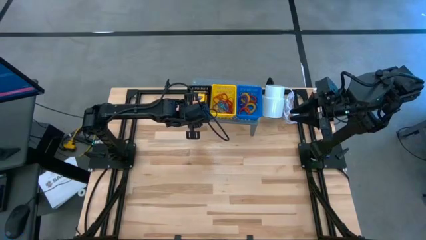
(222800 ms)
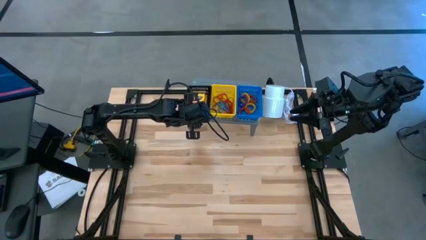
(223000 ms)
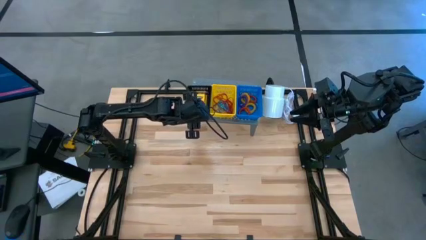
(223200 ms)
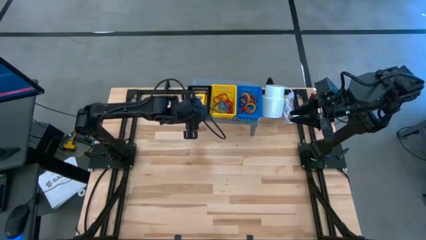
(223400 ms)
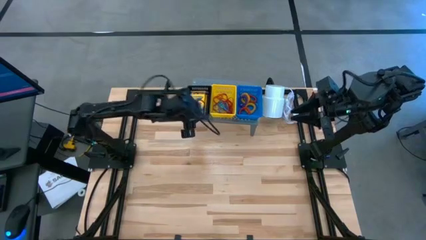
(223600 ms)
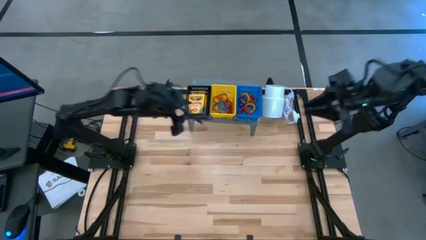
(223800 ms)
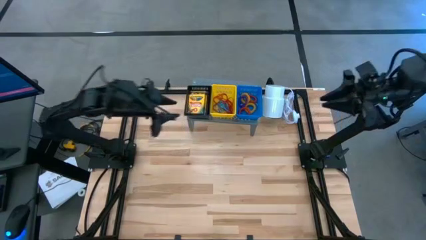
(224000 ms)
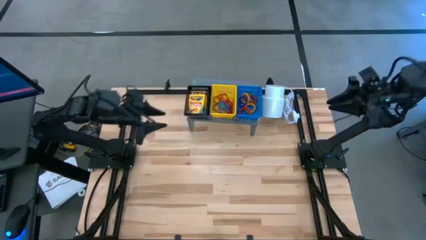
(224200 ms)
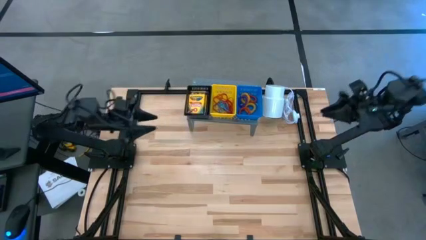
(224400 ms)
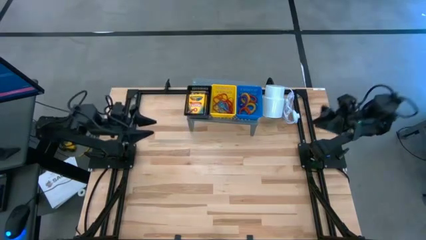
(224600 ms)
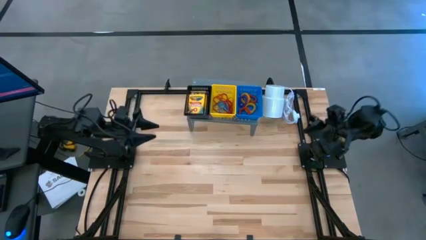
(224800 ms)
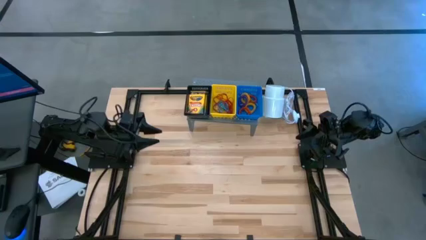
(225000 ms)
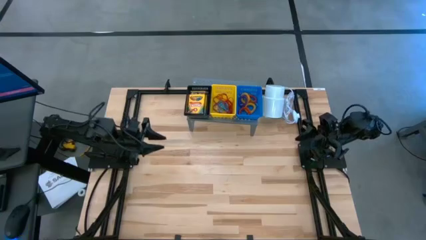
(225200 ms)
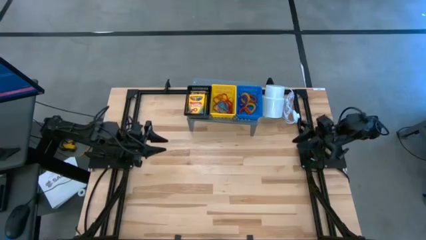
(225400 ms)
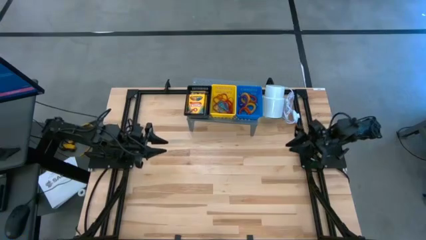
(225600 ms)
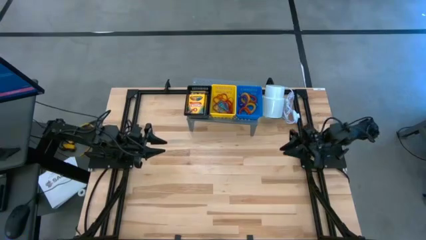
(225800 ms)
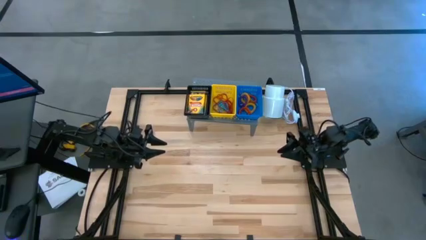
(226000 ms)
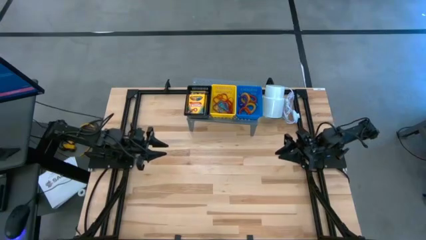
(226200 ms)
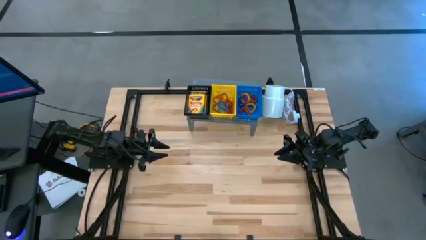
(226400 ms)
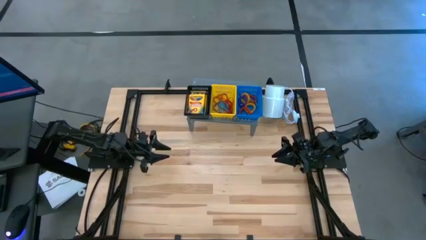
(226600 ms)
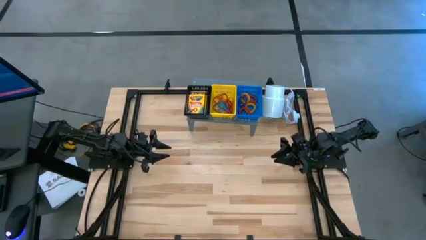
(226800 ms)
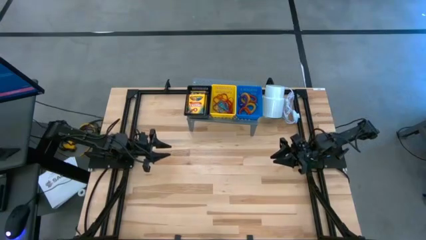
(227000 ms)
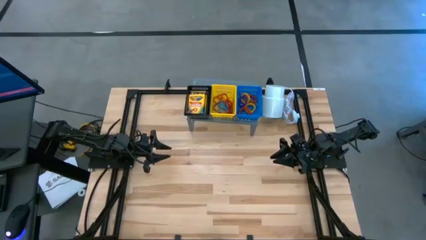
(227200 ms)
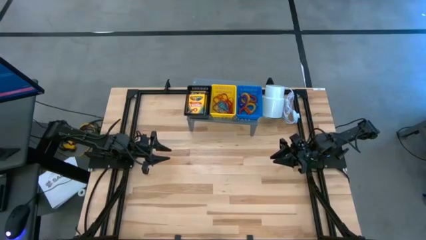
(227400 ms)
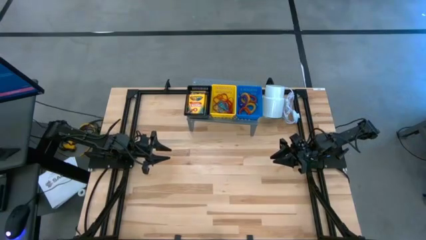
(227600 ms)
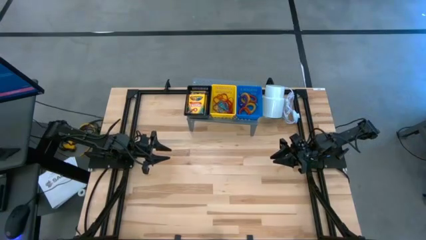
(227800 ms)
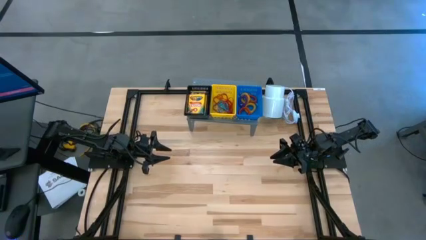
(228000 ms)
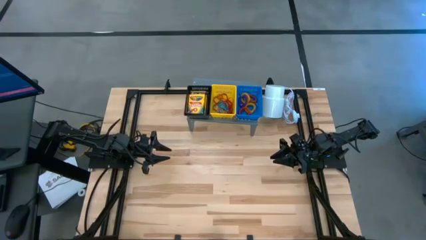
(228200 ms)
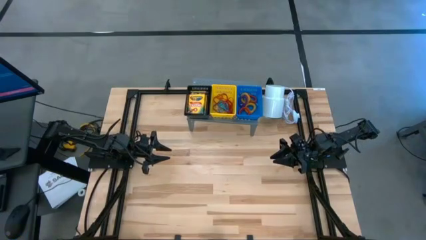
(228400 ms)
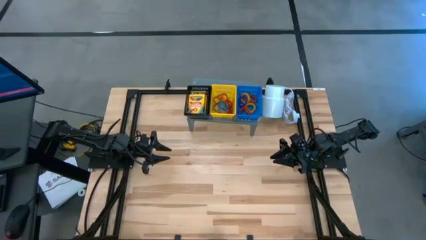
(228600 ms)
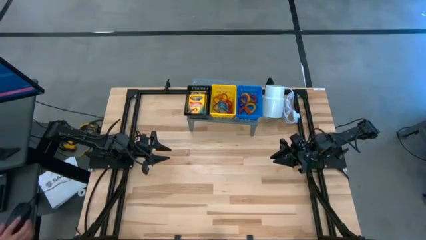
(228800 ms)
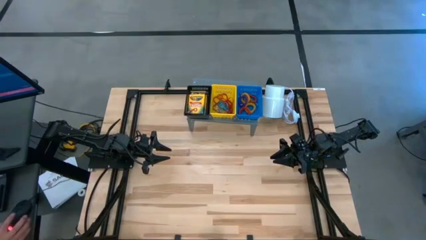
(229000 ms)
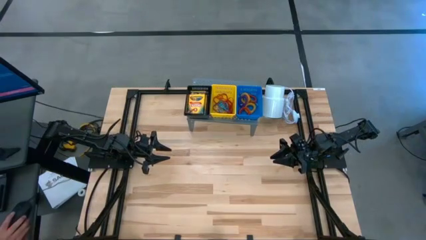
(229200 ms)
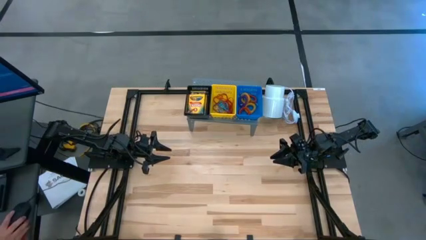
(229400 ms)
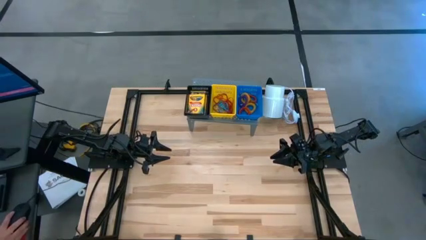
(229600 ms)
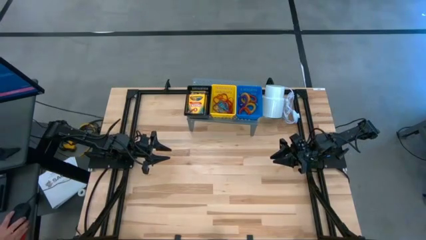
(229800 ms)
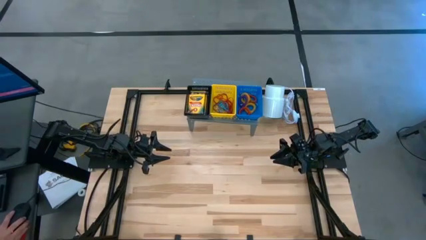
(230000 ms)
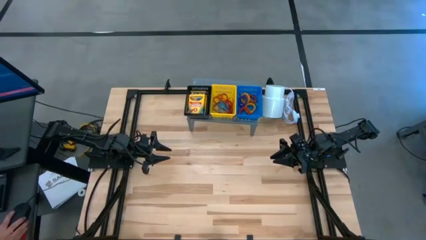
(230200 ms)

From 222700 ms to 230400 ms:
Task: Pick & Place Office Desk Supplies
Return to Home Position

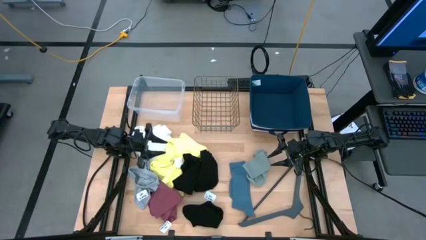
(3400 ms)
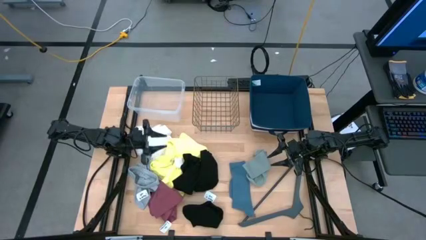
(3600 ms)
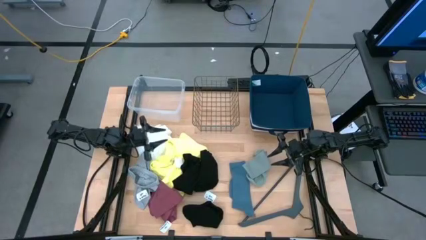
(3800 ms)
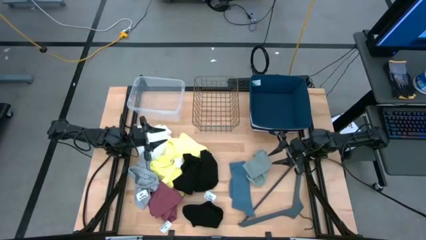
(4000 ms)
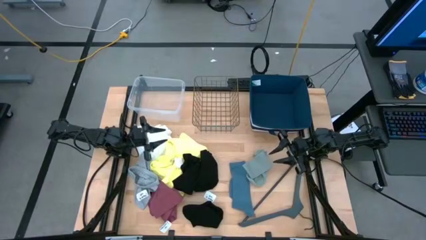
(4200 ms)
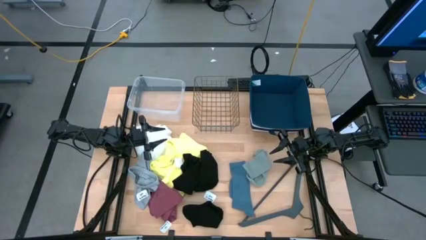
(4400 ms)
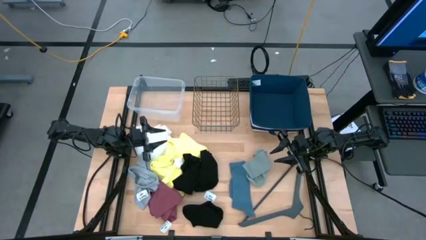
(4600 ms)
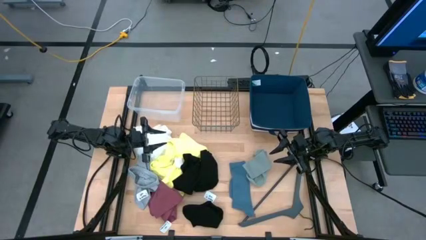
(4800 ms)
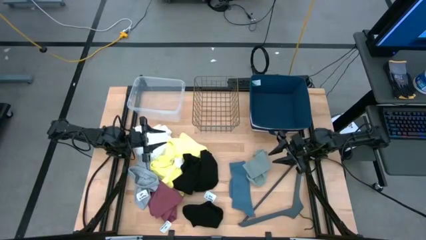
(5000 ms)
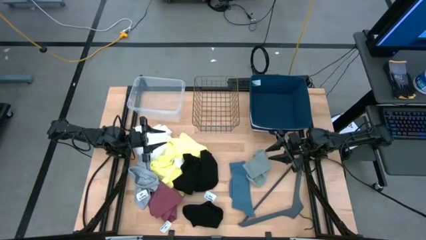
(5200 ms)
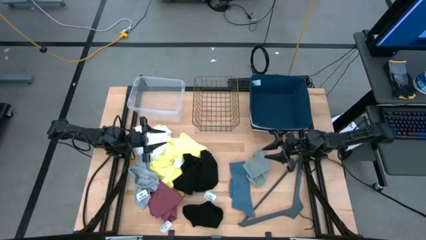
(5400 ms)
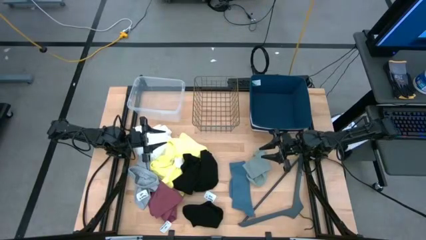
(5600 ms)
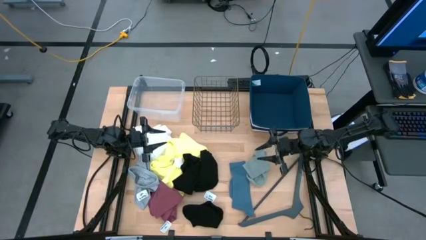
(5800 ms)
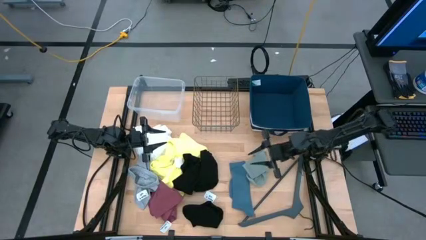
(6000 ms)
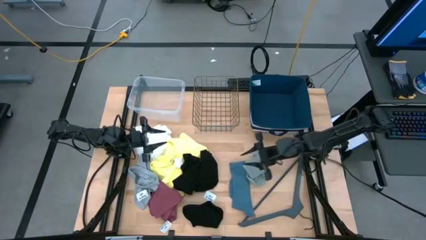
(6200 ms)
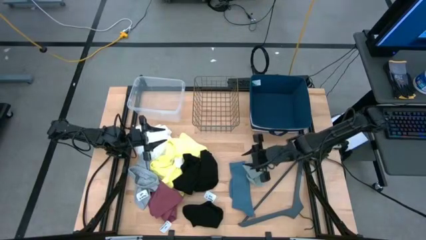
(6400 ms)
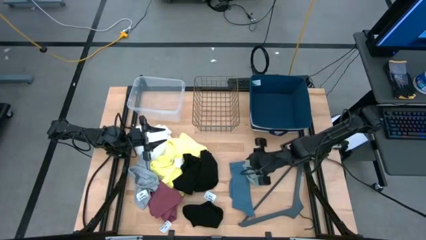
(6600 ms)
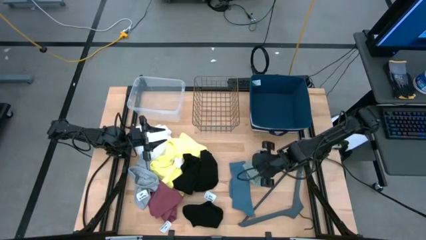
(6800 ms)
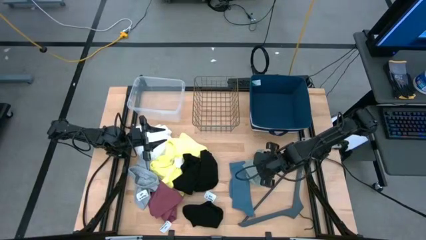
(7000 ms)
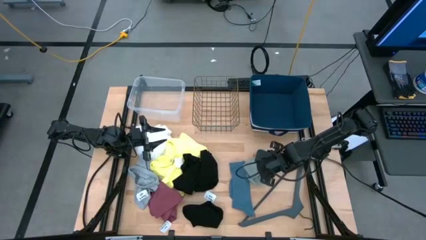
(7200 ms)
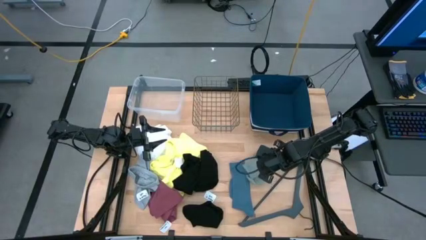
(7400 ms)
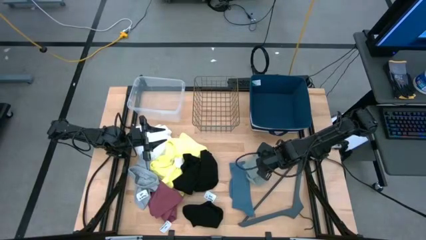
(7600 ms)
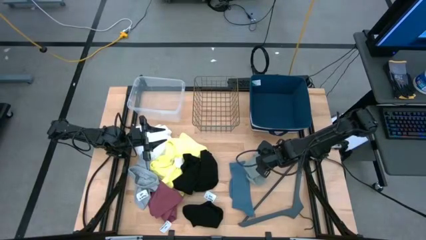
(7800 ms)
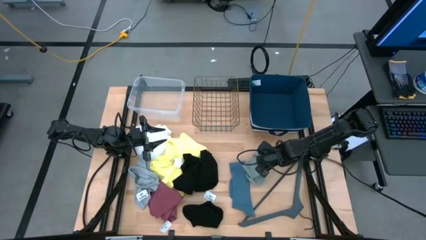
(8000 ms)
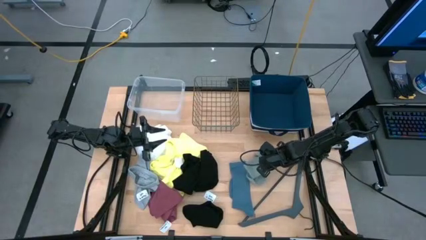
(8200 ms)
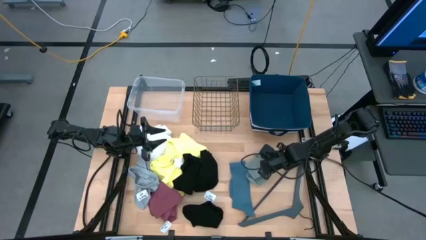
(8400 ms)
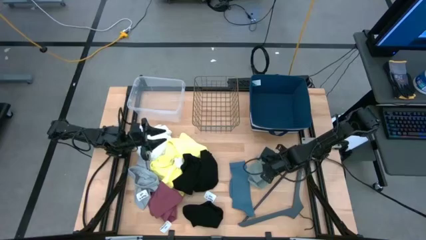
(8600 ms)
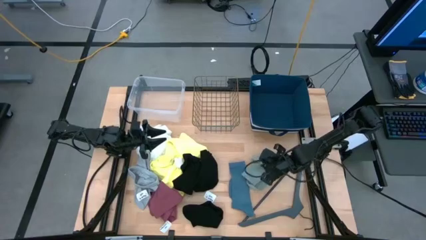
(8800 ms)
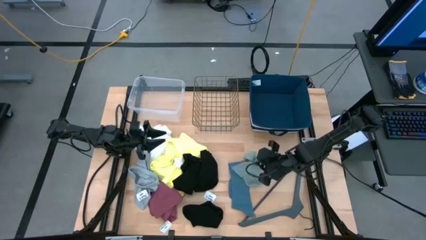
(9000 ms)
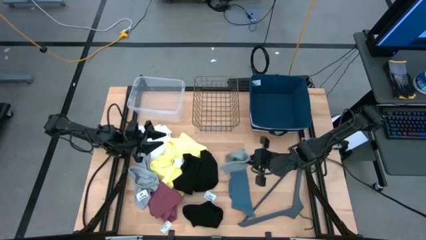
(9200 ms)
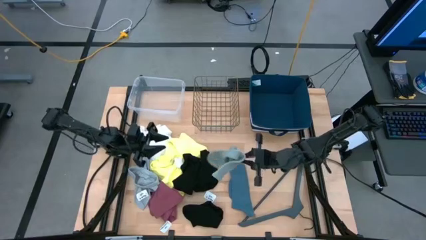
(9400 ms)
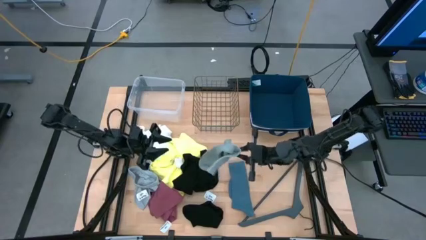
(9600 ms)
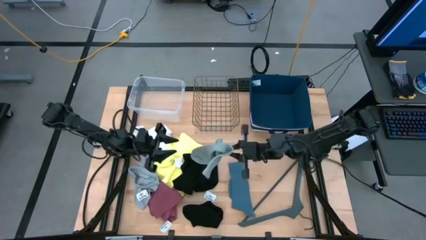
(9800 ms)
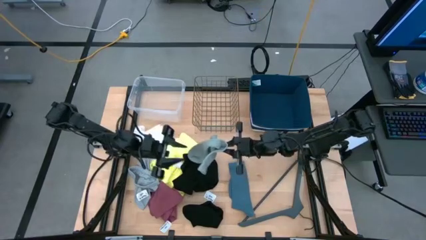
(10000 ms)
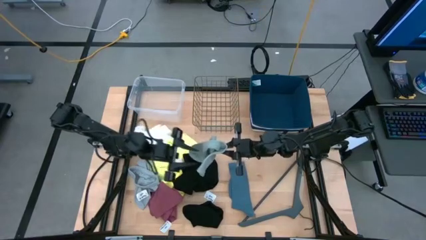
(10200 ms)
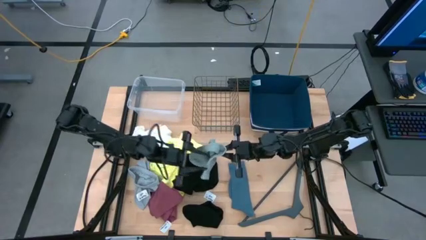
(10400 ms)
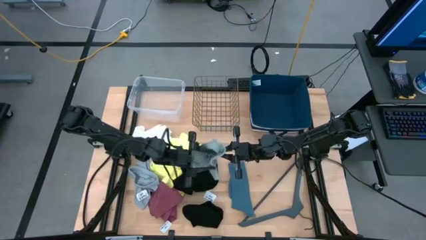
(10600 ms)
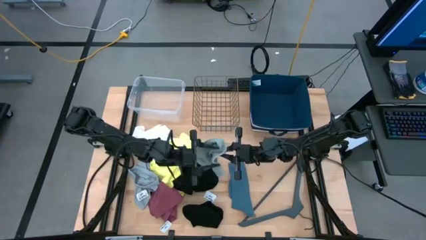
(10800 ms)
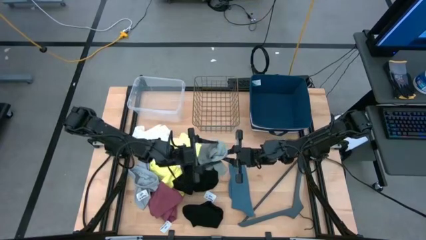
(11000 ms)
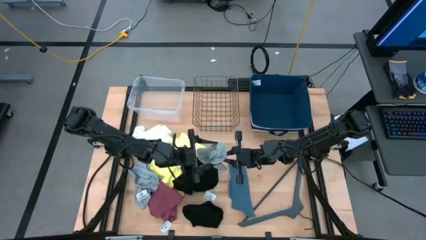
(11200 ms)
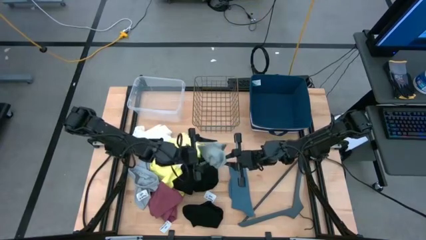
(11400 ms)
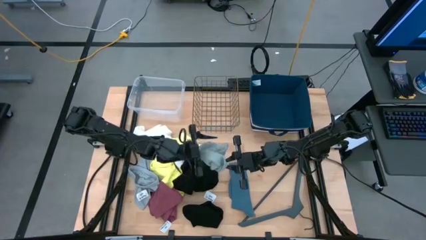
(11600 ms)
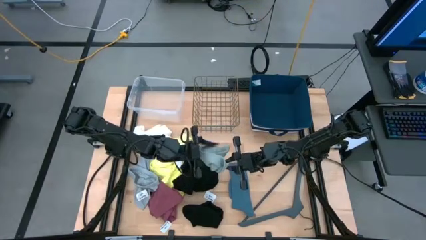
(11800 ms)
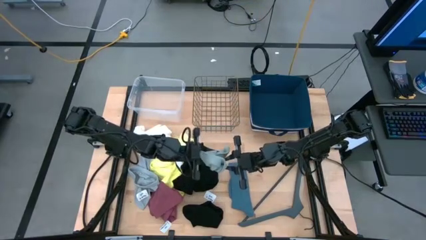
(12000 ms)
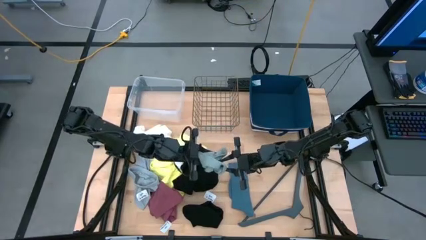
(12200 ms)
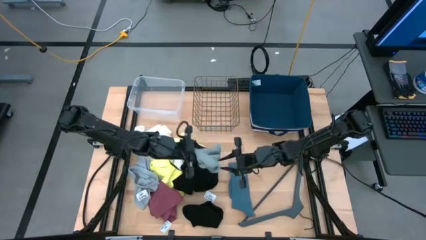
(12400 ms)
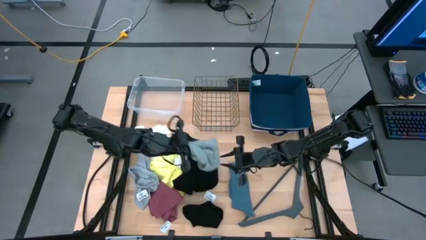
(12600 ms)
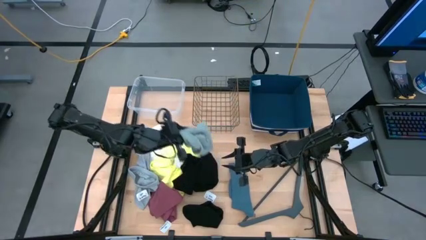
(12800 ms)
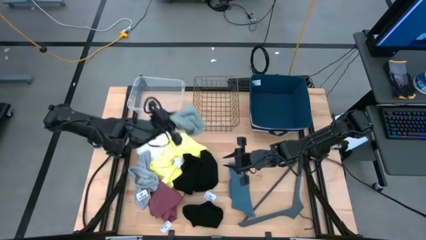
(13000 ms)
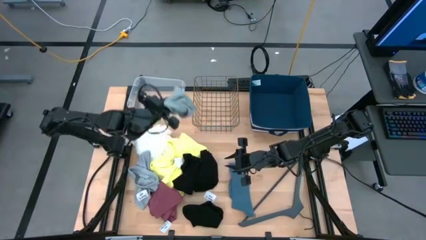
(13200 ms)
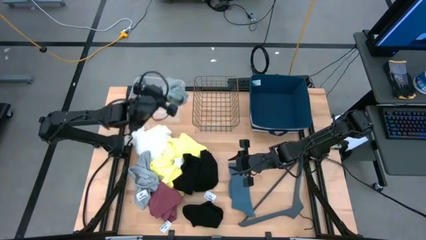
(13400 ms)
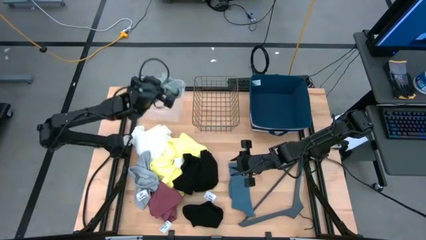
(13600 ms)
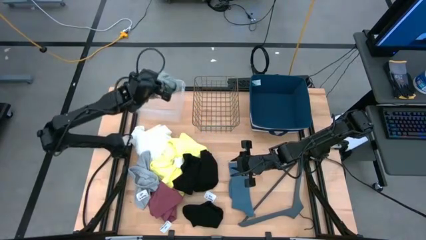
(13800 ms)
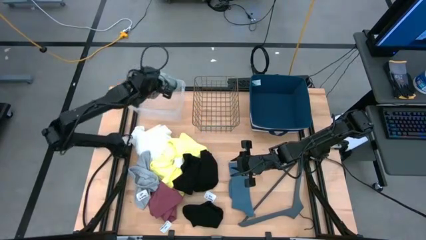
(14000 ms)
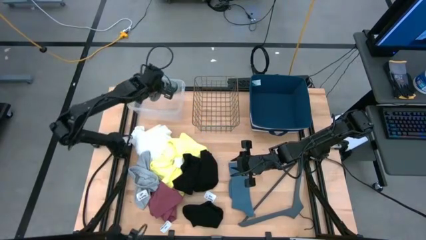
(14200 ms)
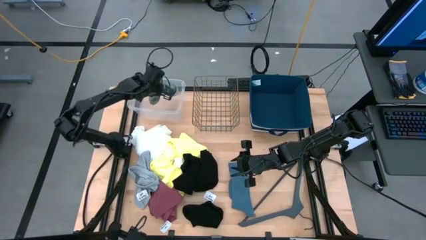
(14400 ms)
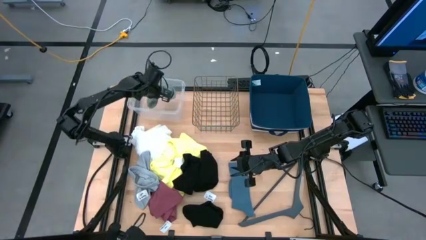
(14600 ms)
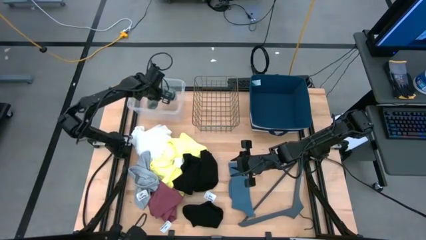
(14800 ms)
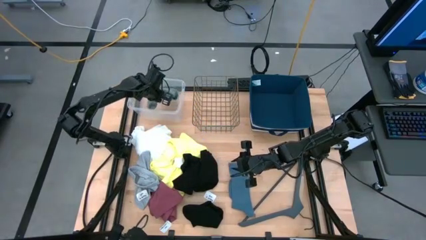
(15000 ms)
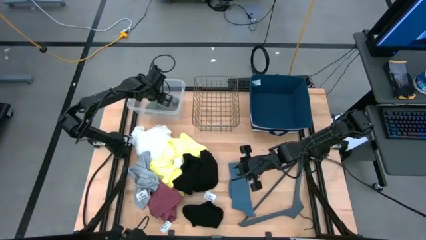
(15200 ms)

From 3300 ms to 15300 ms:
Task: Pick & Place Cloths
Put the gray sock into the transparent container
